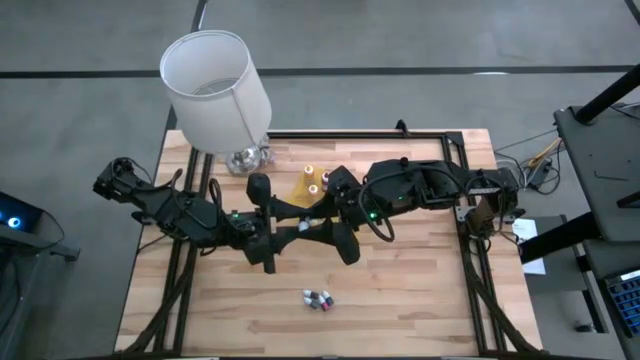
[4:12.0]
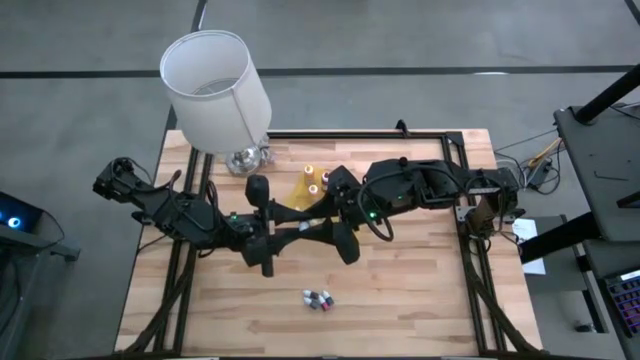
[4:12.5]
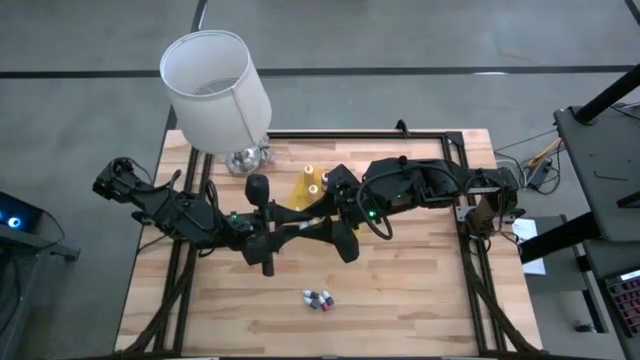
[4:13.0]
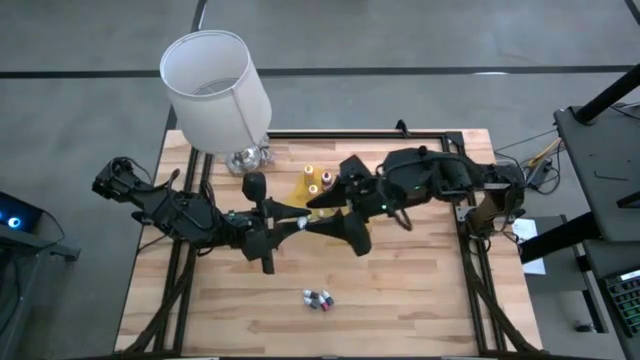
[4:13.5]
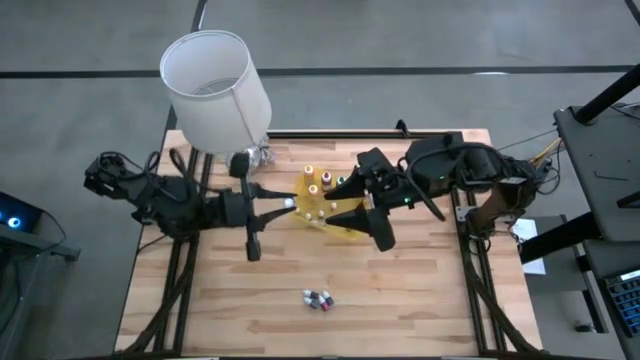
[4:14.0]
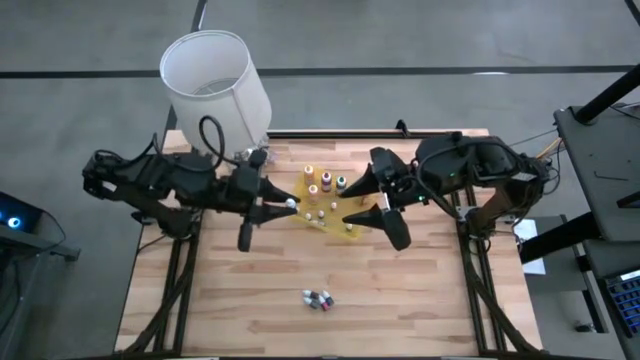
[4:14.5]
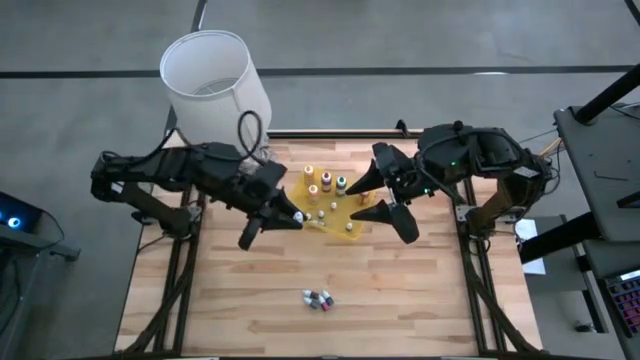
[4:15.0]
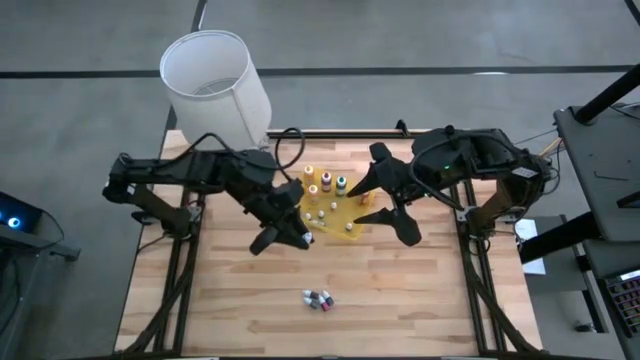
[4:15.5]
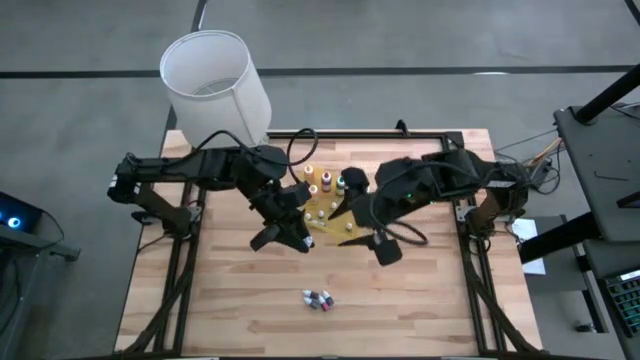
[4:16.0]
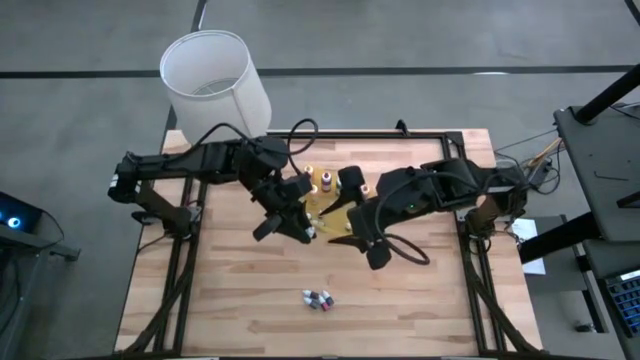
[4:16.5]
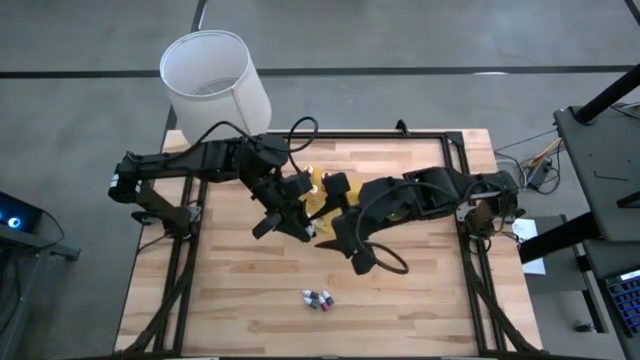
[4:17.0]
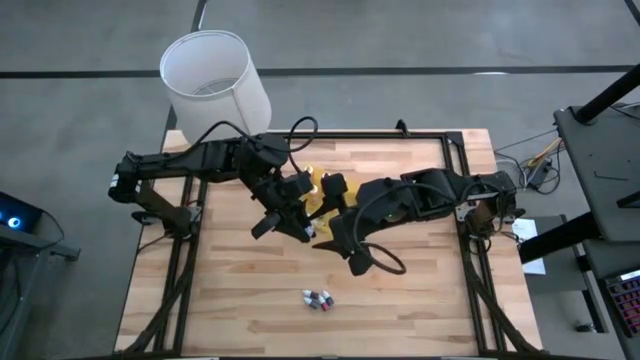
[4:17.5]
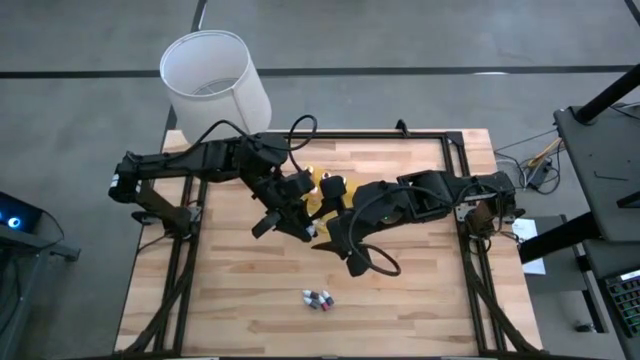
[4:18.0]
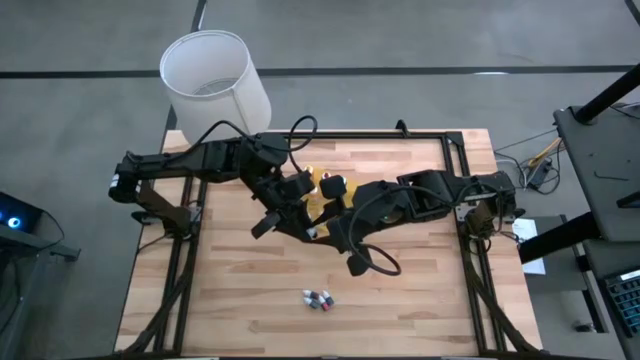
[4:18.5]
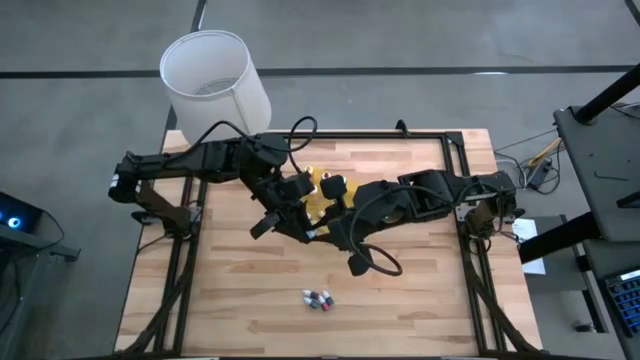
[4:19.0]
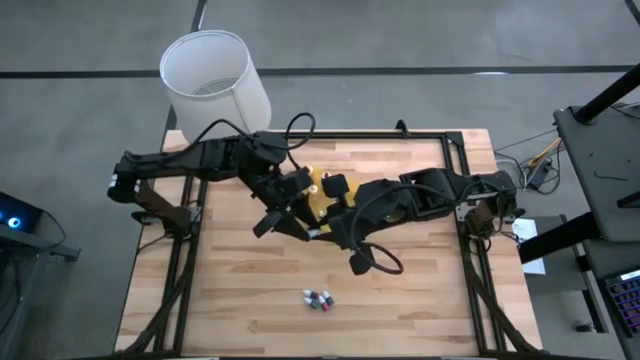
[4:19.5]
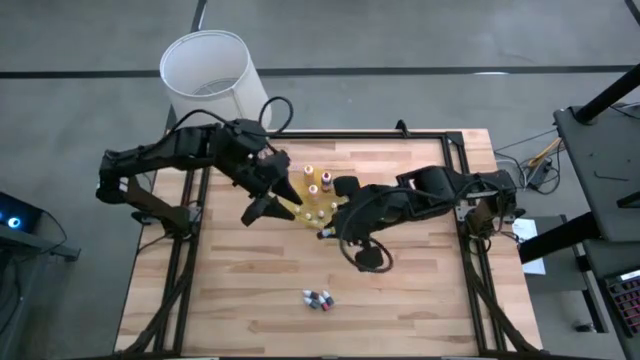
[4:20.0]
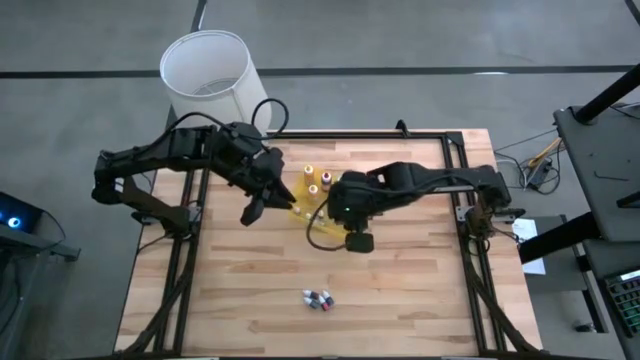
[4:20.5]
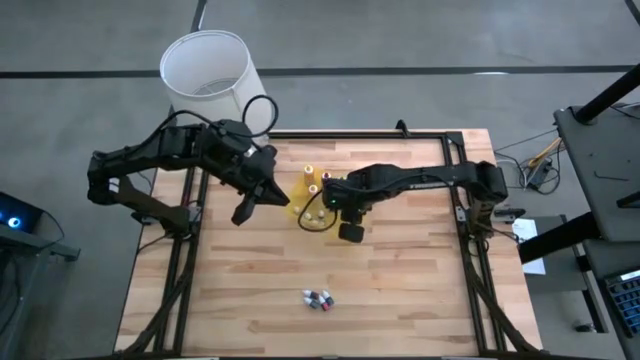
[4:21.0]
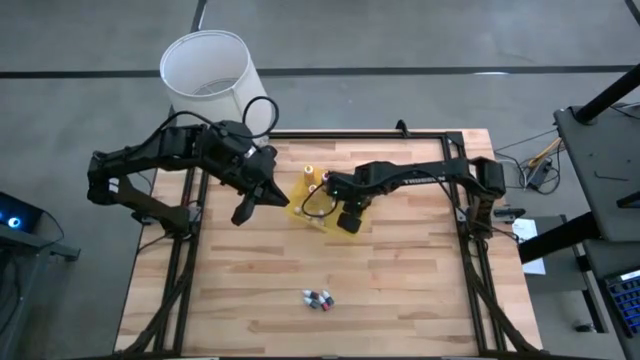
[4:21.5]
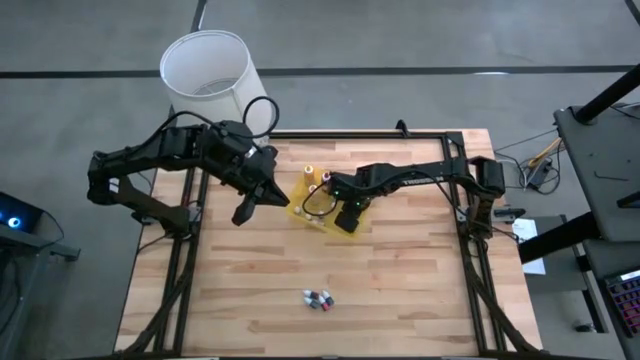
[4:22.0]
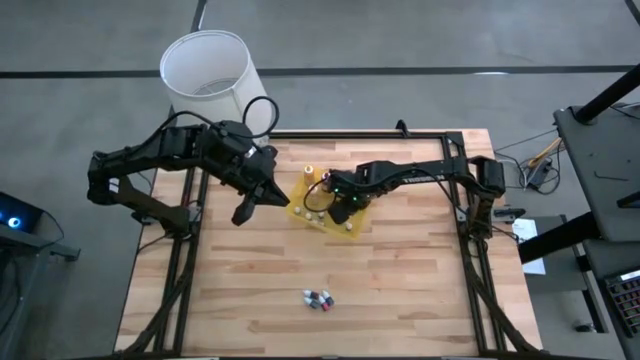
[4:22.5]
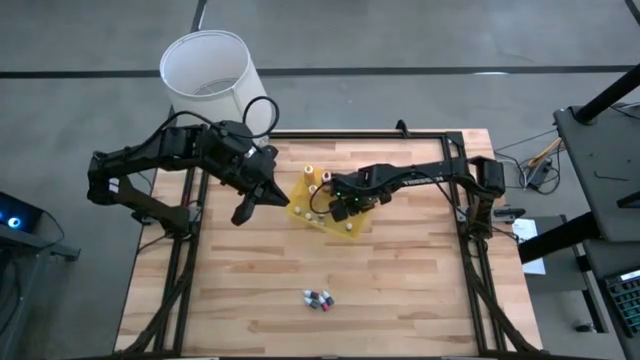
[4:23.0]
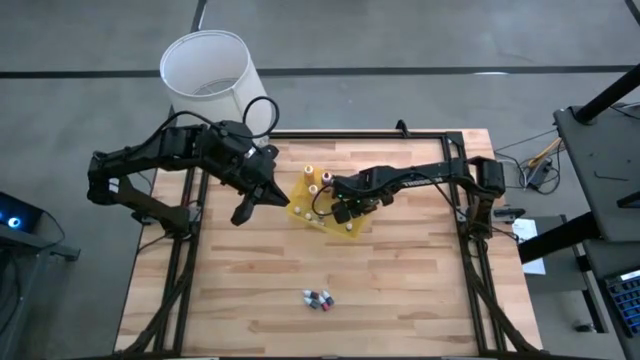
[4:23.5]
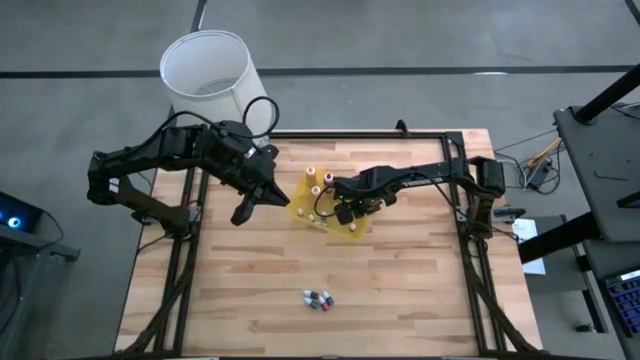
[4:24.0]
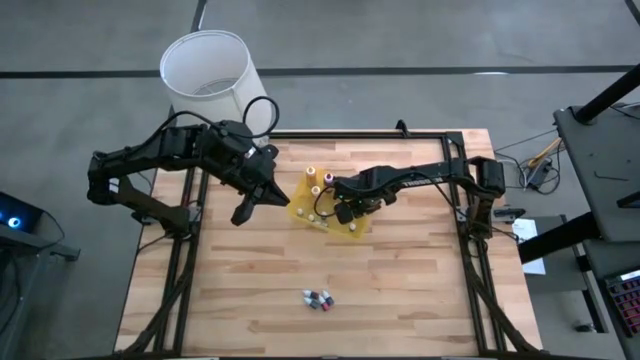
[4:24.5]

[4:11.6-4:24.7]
Task: Pick & Place food coloring
Put the small green food coloring bottle into the yellow bin

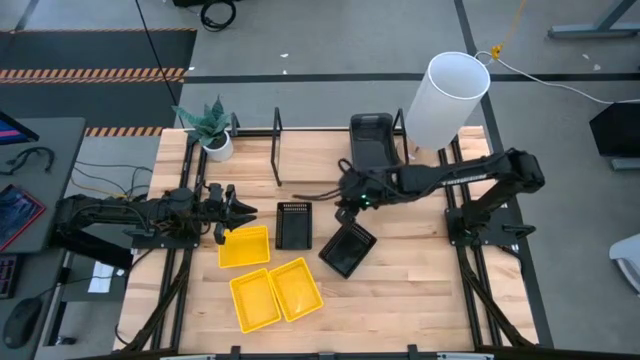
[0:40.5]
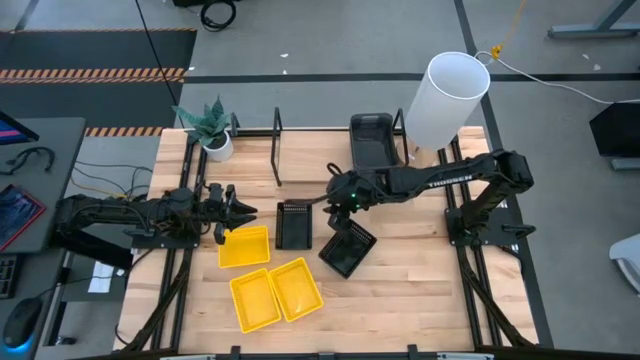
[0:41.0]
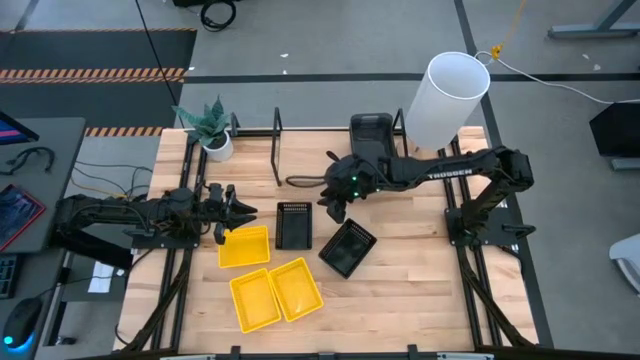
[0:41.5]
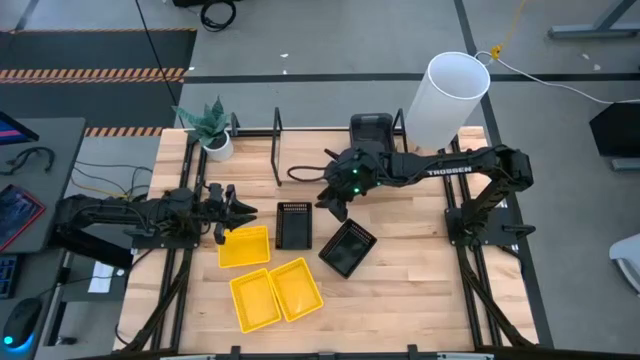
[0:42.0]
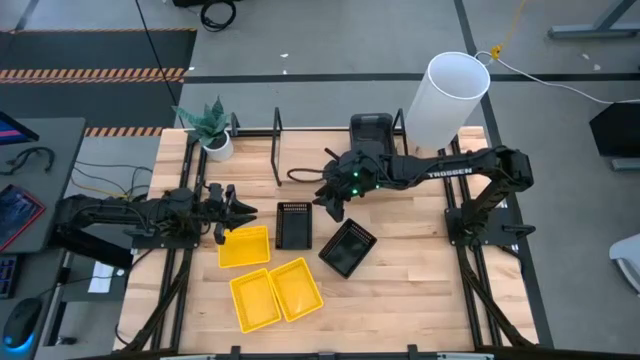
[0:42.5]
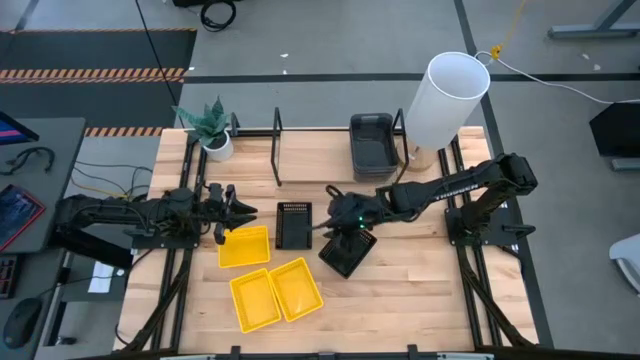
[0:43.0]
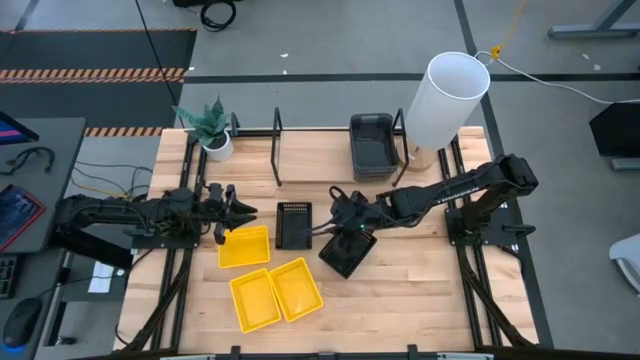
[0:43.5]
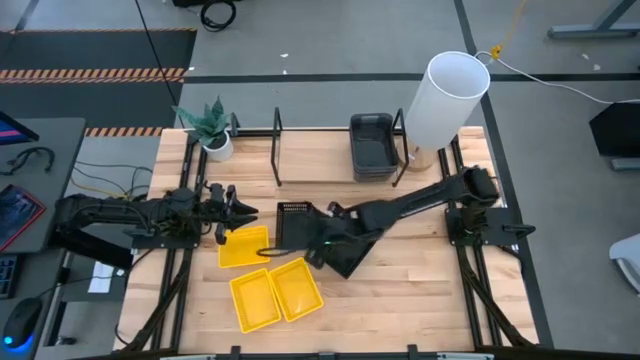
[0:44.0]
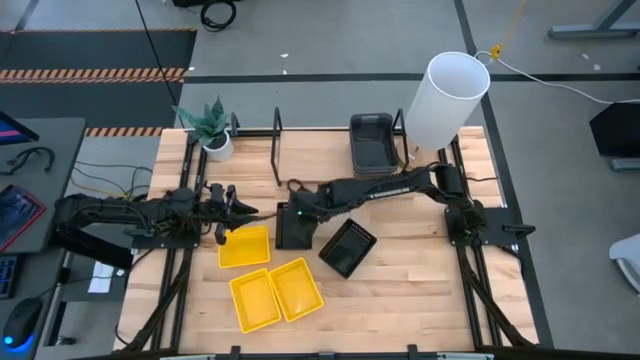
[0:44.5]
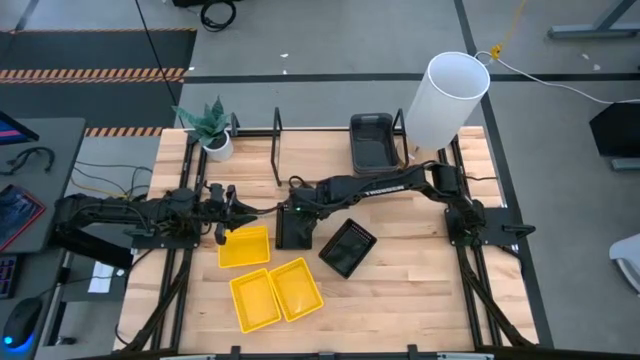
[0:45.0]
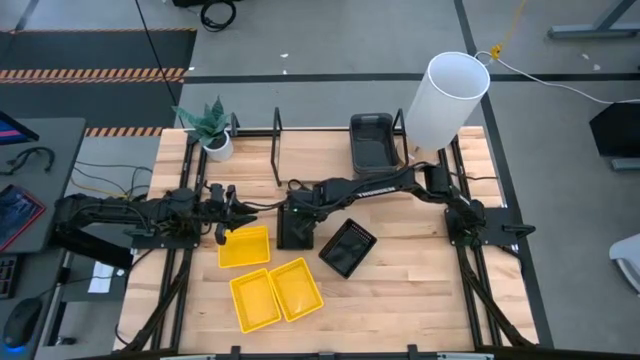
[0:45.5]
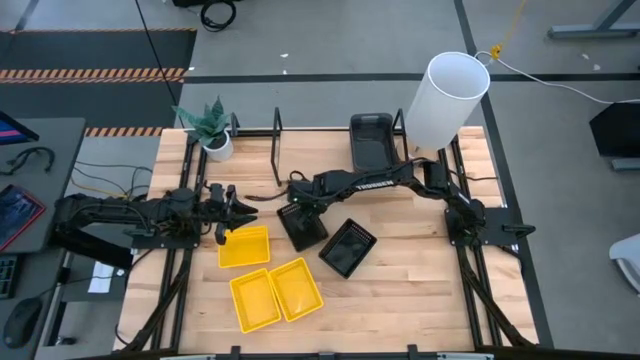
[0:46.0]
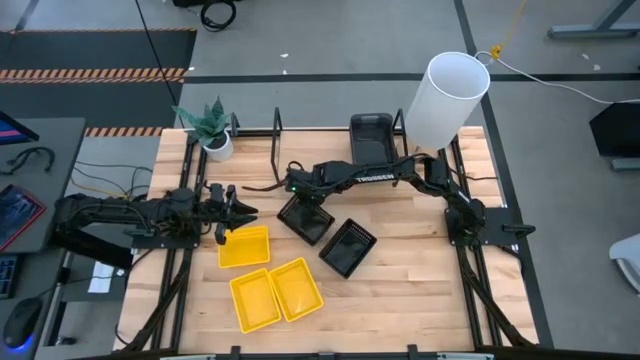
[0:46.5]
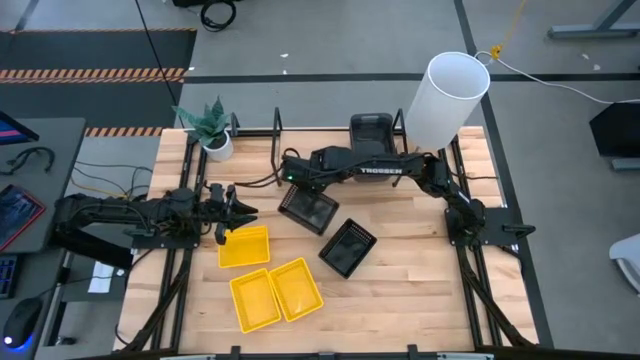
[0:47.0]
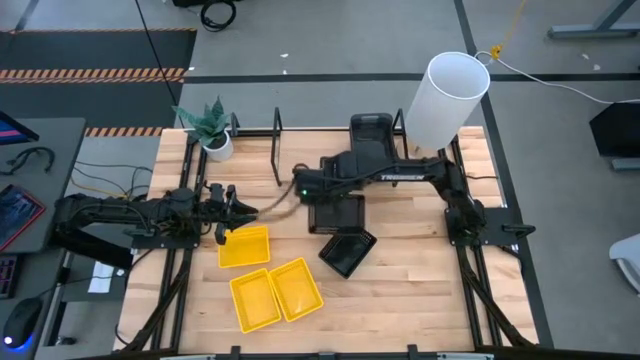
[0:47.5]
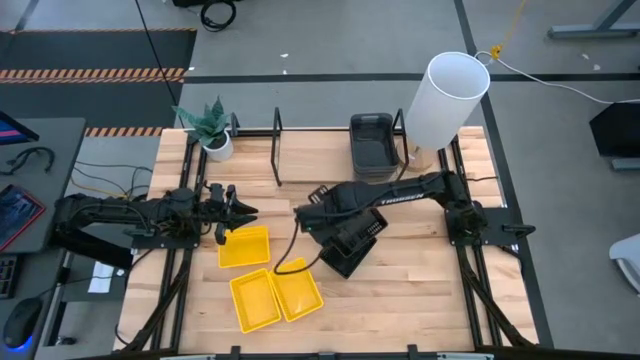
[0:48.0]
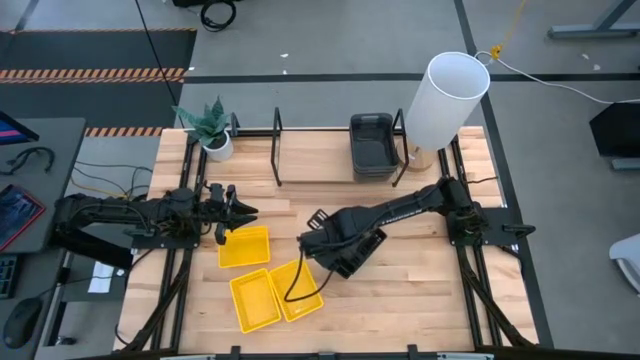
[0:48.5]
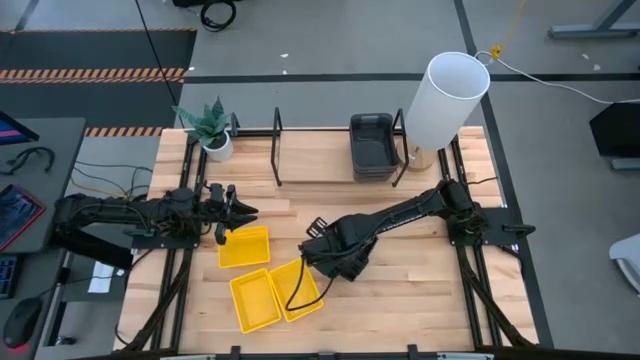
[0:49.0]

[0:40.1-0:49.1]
Task: Stack baskets on shelf by color
Stack the left black bin on top of the right stacked black bins
